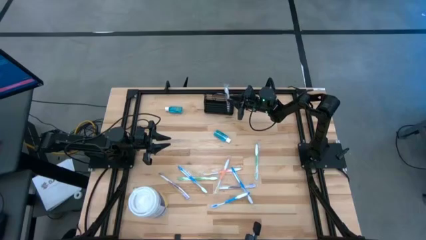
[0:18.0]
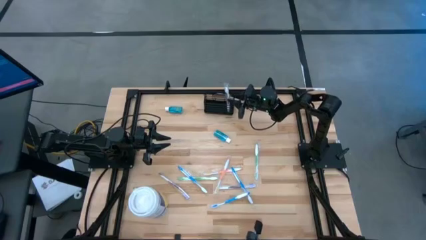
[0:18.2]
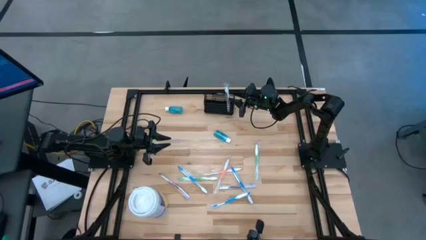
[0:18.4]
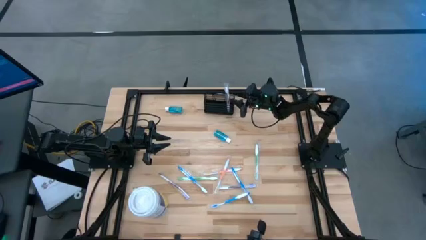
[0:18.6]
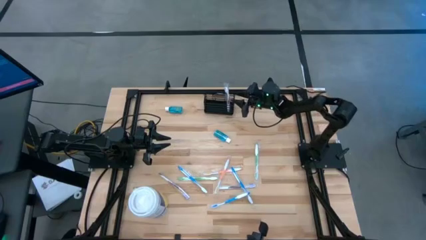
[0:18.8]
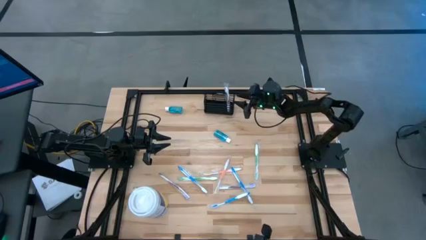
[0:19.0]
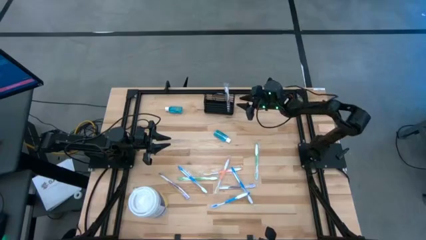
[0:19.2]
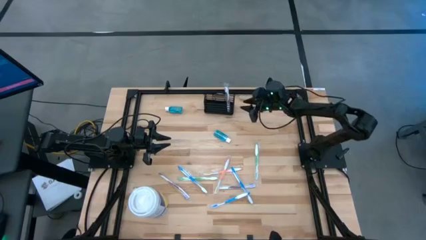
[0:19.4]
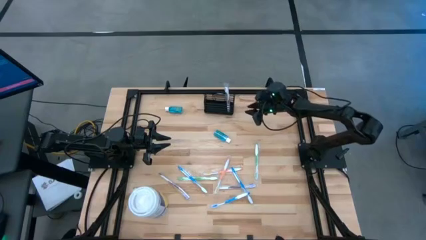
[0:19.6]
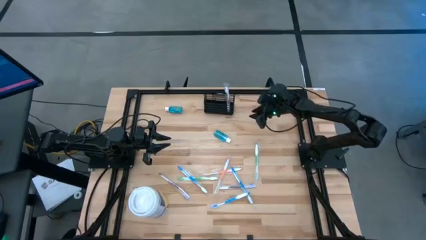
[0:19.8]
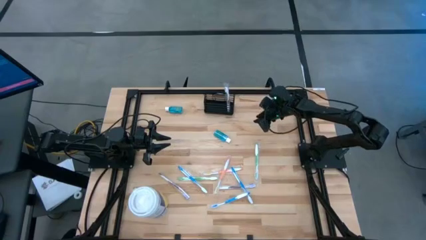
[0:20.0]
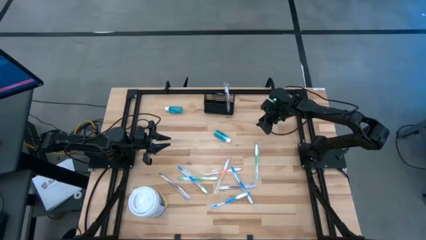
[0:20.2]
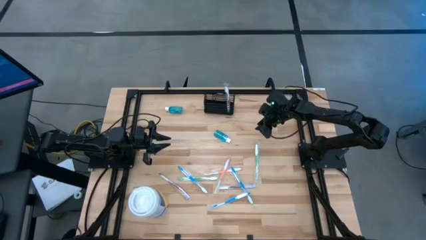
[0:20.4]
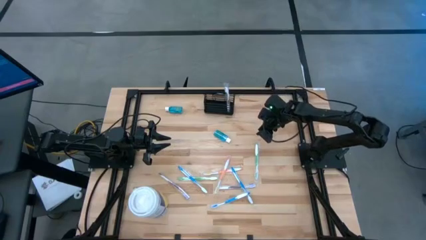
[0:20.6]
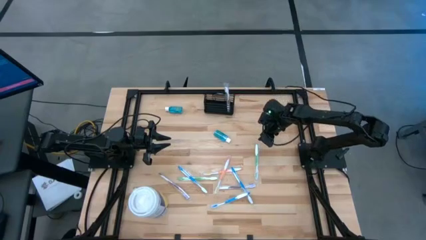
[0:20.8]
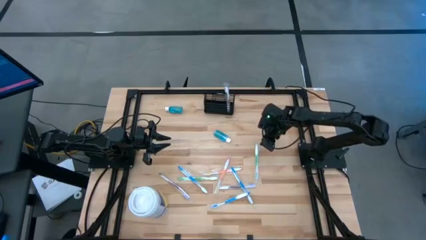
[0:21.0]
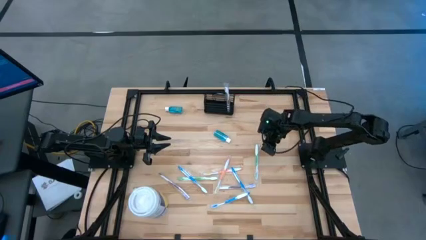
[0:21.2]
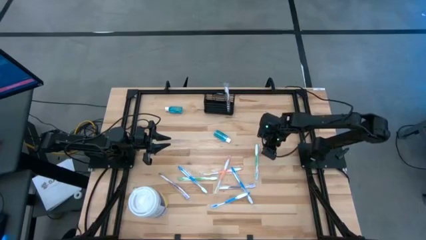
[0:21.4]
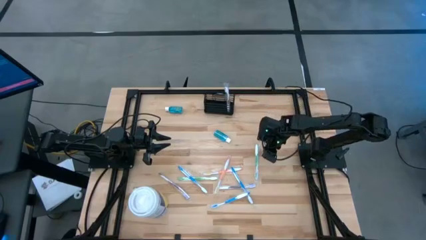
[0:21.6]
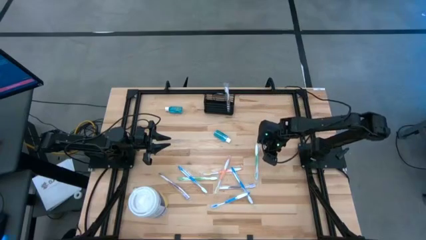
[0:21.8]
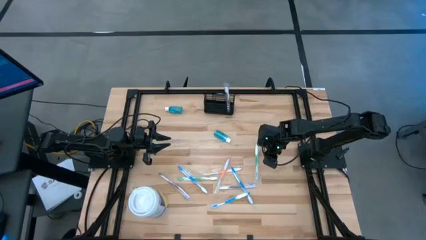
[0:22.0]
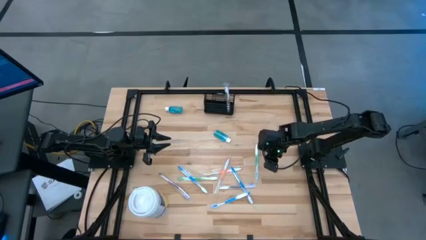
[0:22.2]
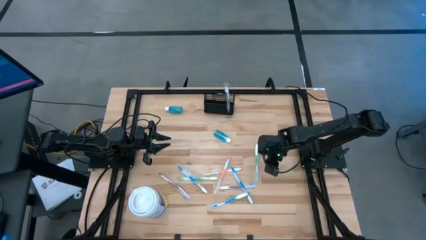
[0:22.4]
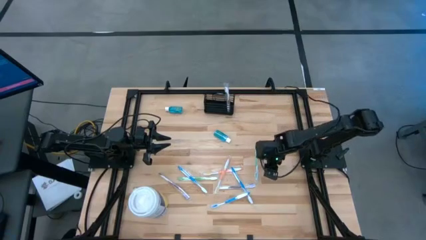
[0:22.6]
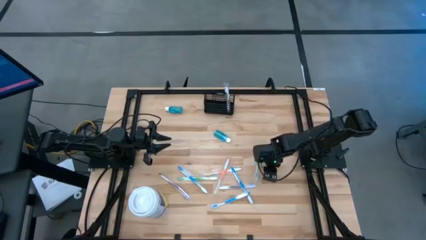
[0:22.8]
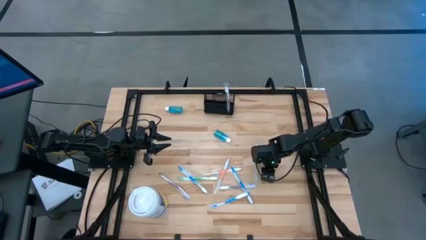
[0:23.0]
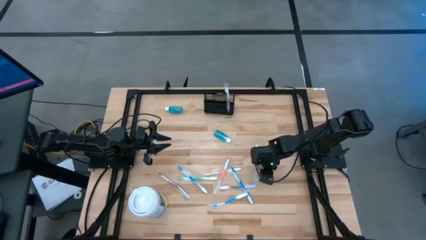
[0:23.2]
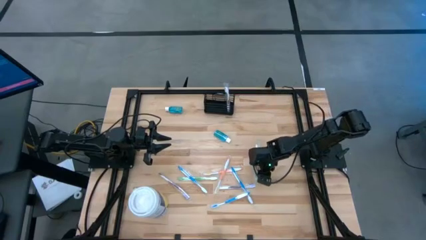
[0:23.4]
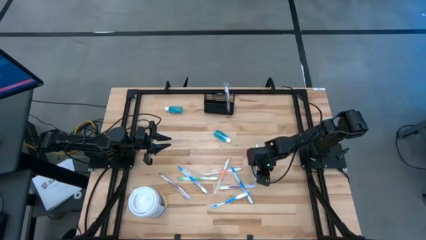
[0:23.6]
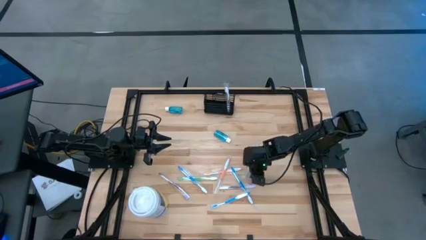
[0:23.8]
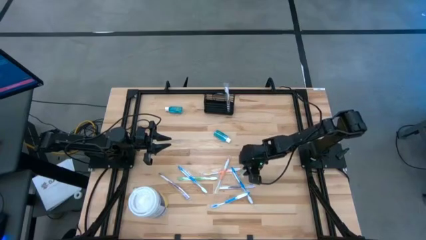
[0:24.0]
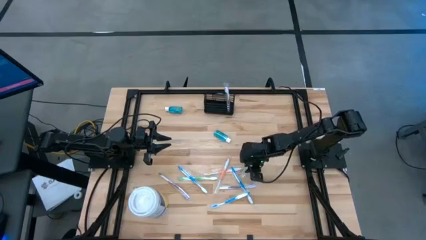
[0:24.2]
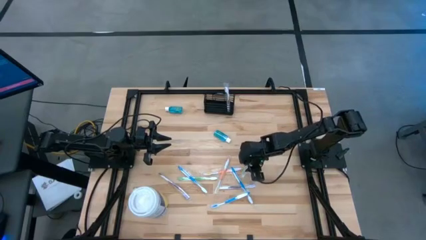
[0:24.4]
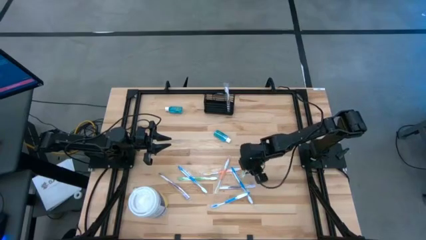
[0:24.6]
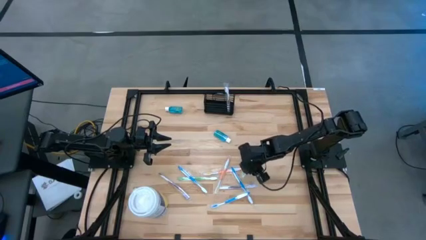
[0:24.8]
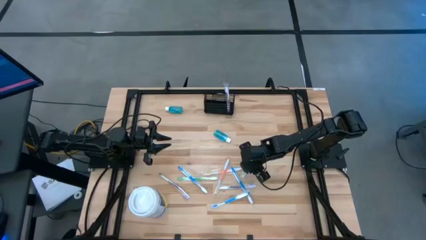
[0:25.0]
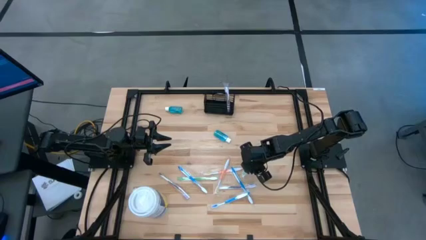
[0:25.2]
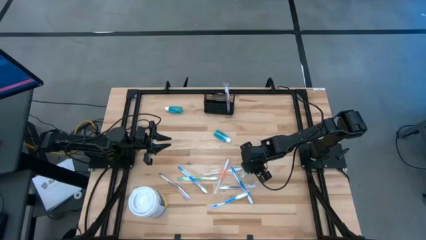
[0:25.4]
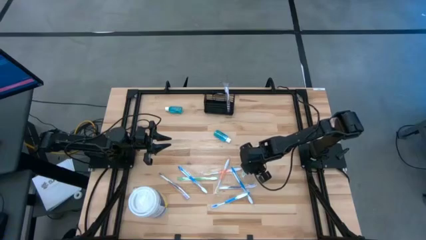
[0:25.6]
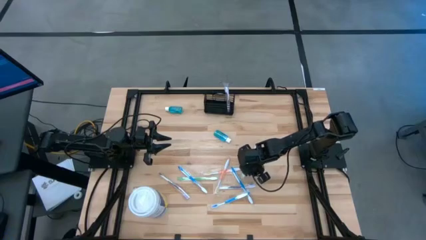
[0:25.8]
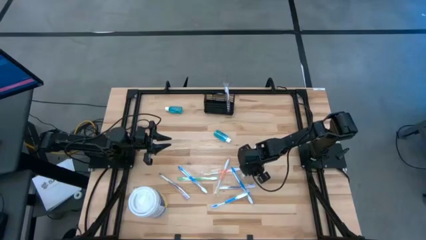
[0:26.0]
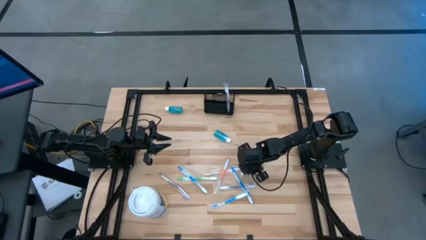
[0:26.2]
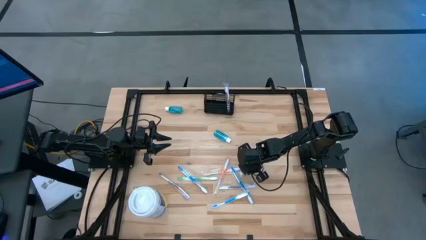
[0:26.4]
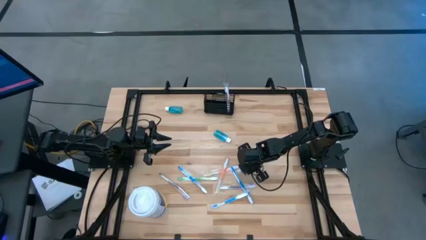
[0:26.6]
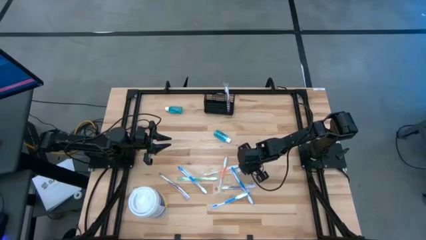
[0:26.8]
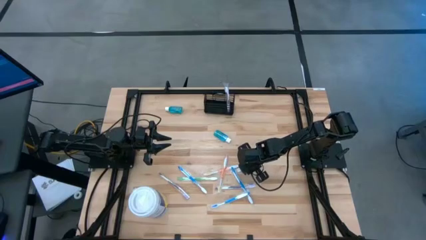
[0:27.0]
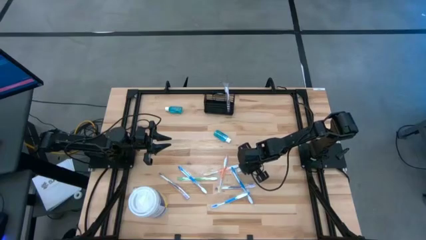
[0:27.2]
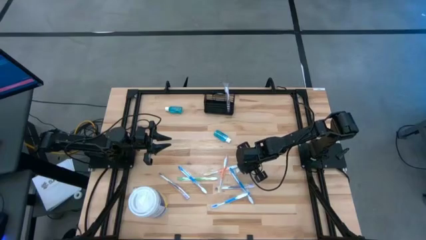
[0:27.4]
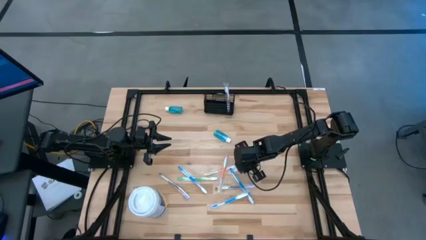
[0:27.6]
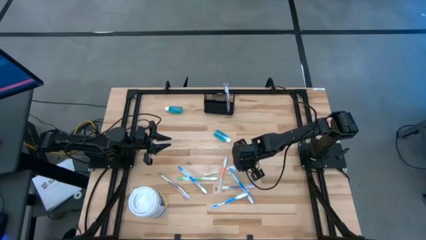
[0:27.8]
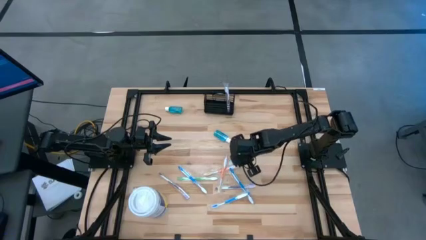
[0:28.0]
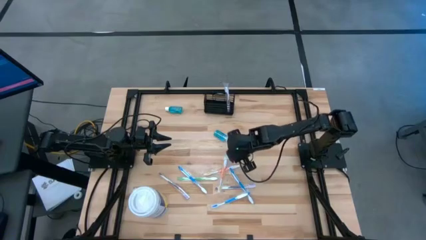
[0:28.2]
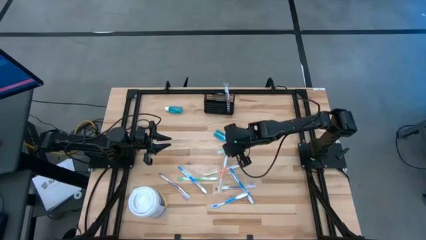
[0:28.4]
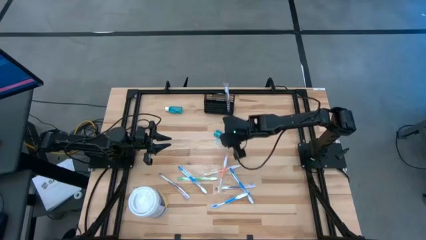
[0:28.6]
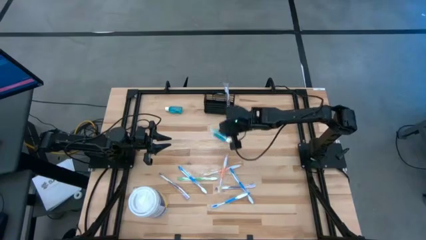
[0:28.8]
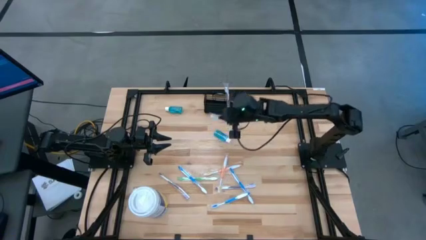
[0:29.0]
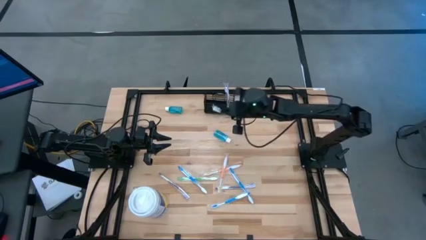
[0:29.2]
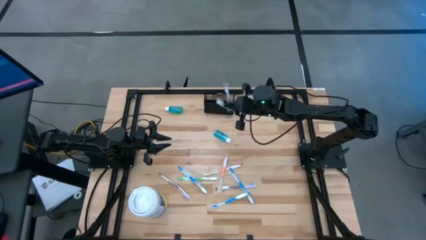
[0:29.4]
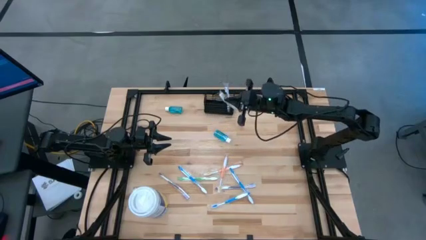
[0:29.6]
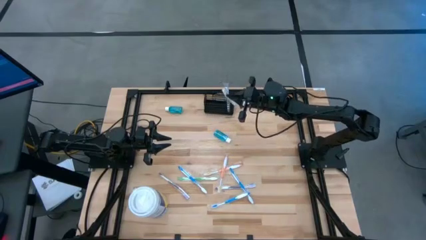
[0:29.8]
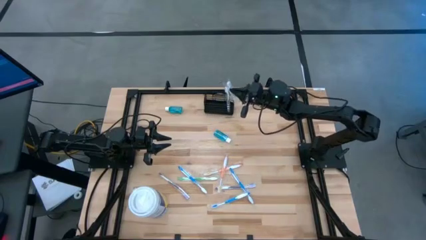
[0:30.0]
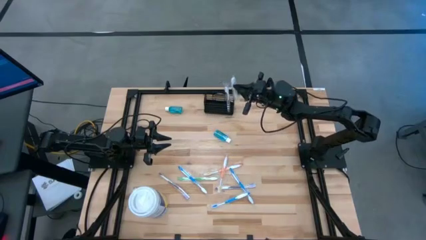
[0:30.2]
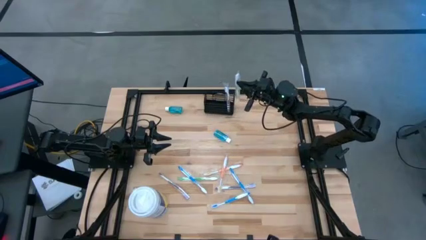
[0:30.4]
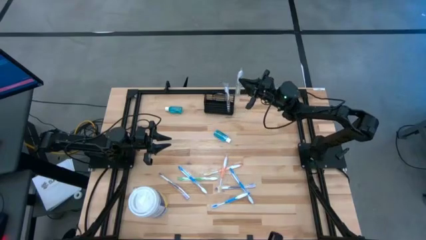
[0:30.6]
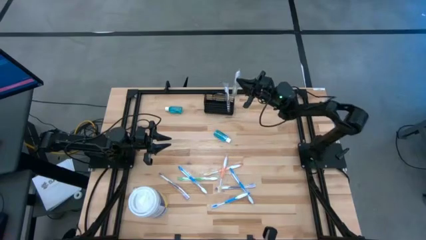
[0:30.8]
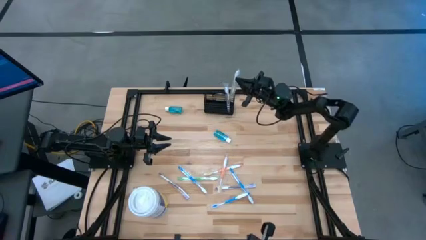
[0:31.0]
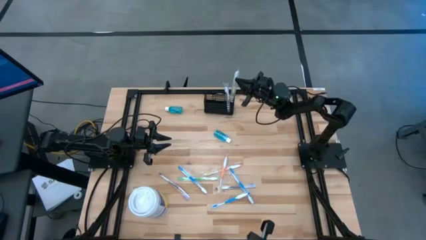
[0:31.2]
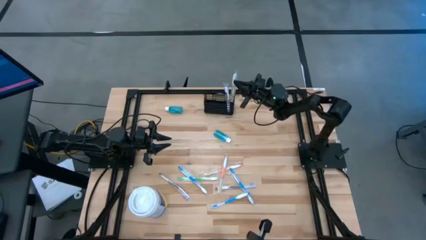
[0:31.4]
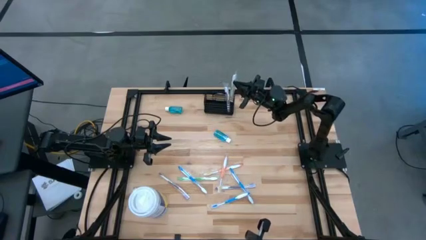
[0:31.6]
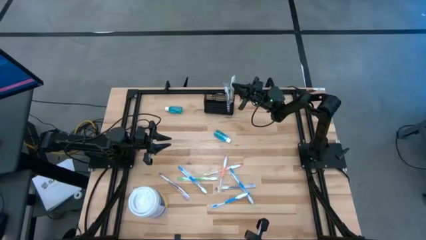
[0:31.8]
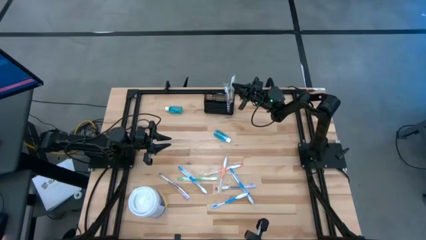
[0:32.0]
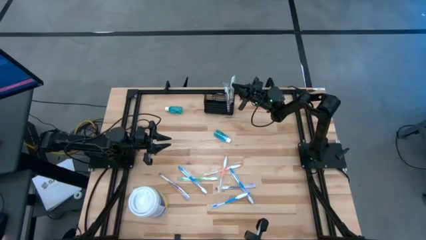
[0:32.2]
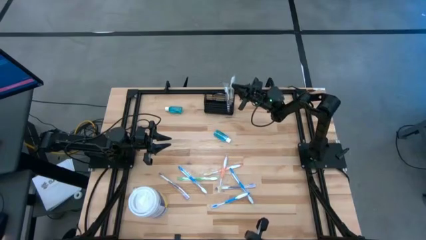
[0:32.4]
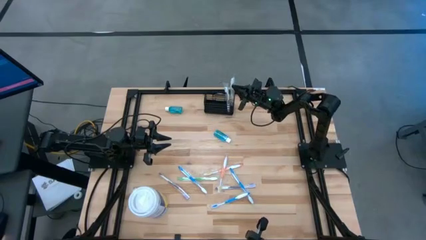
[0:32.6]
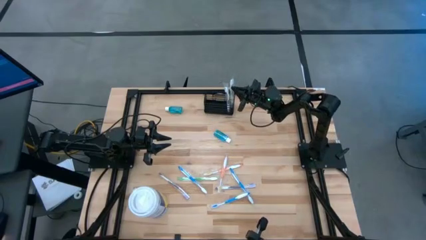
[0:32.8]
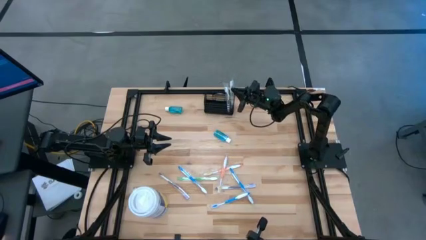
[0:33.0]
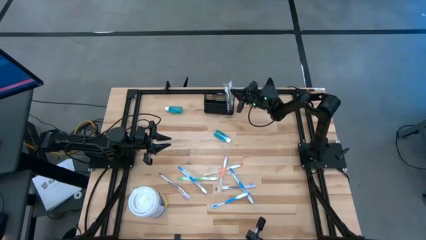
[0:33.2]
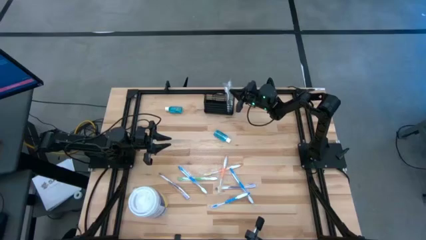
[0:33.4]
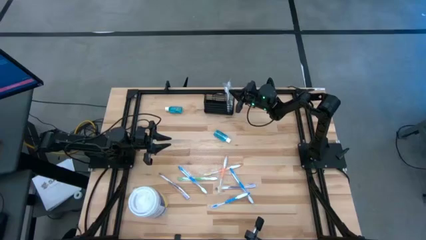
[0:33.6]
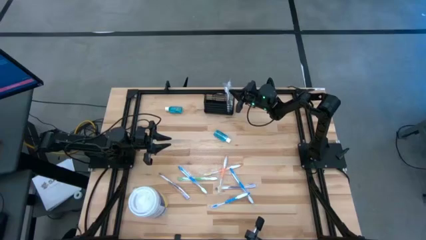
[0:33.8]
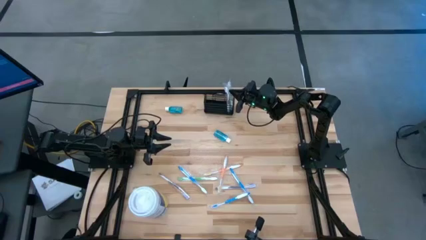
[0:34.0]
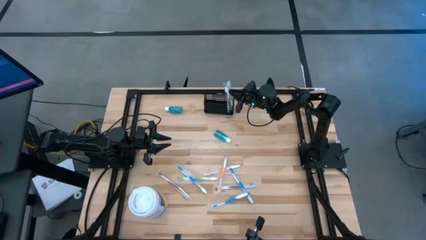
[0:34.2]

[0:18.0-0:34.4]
Task: Pick & Place toothbrushing station
Put the green toothbrush into the mesh organizer
